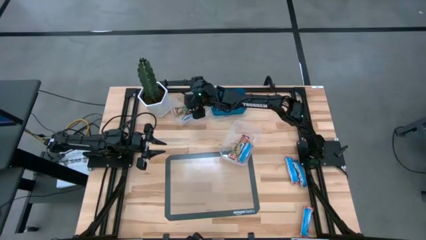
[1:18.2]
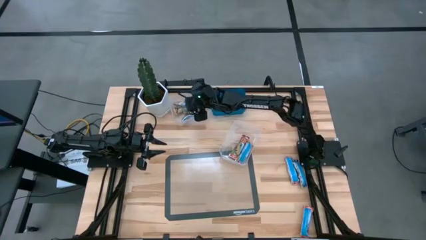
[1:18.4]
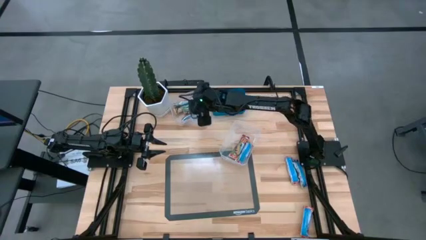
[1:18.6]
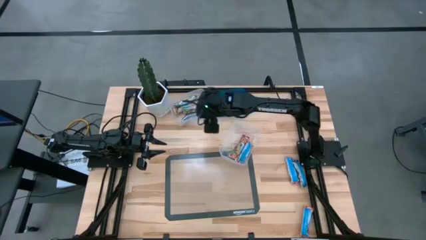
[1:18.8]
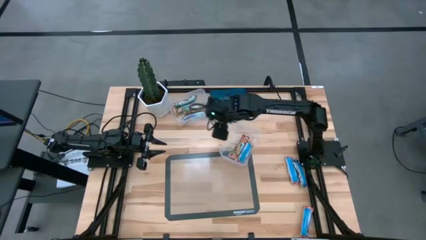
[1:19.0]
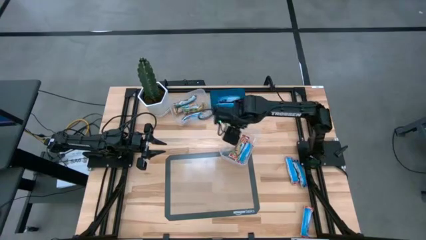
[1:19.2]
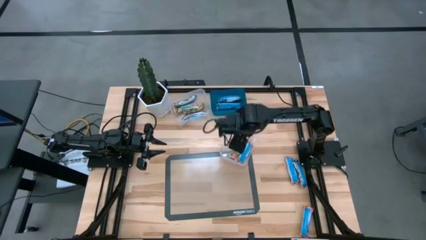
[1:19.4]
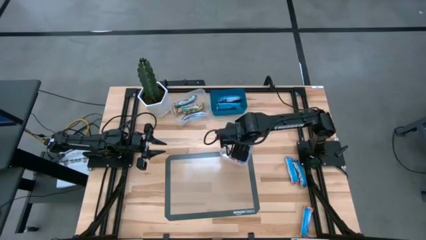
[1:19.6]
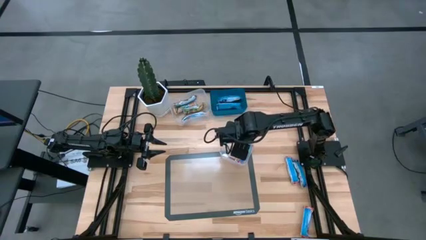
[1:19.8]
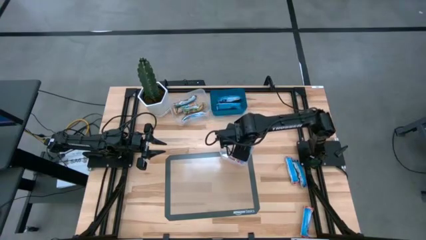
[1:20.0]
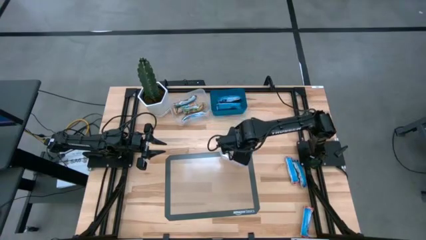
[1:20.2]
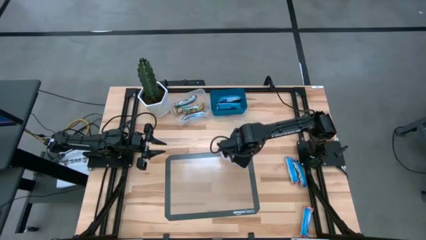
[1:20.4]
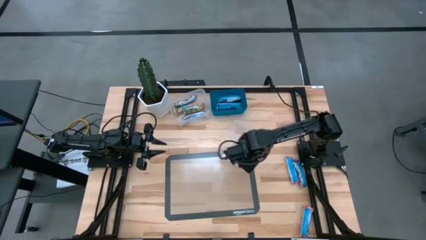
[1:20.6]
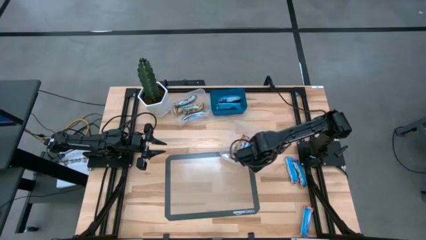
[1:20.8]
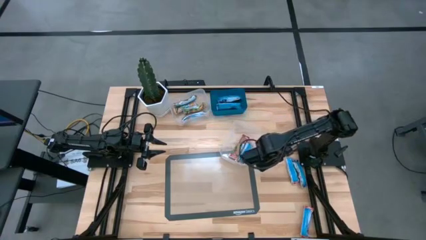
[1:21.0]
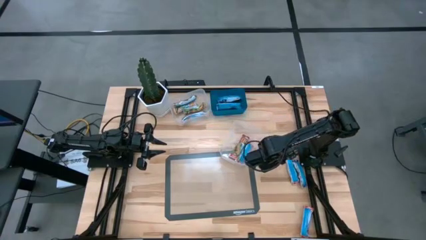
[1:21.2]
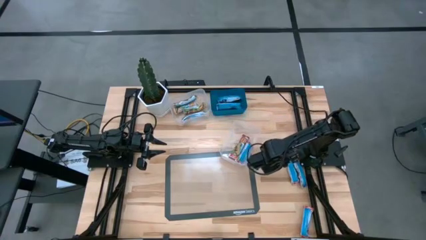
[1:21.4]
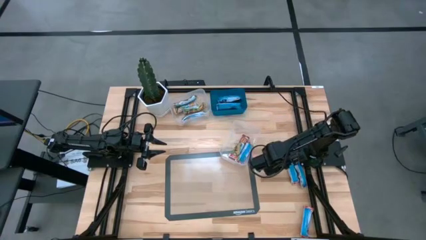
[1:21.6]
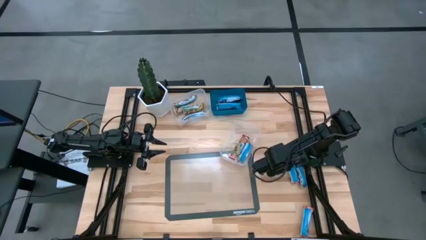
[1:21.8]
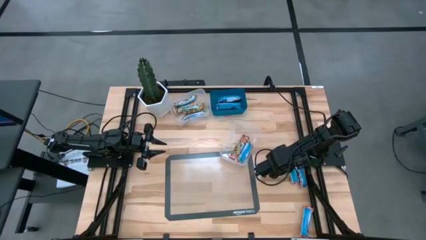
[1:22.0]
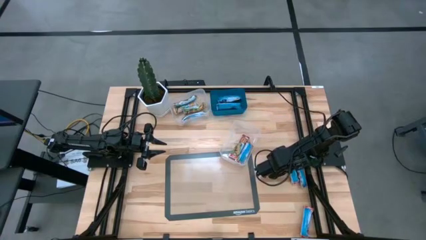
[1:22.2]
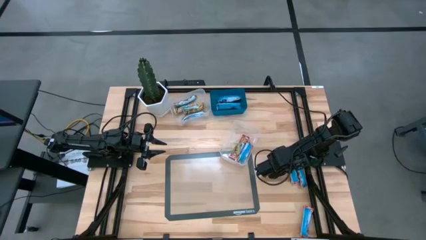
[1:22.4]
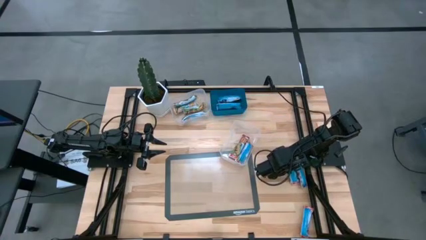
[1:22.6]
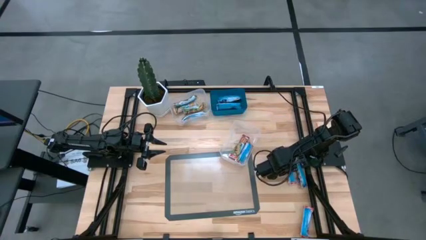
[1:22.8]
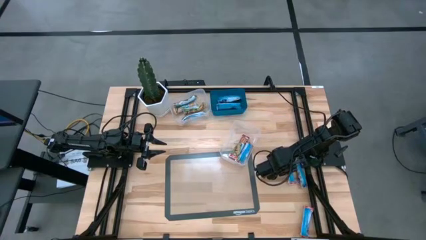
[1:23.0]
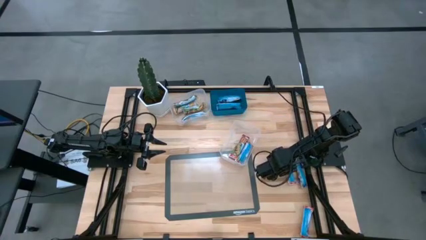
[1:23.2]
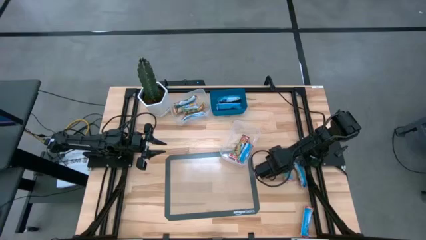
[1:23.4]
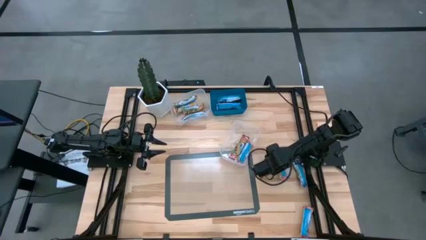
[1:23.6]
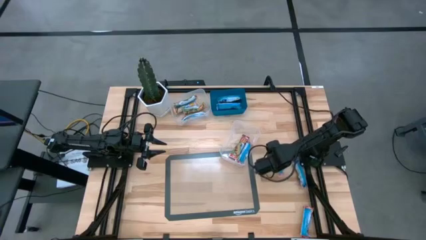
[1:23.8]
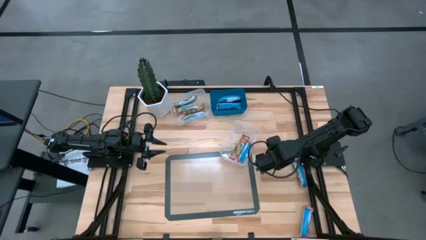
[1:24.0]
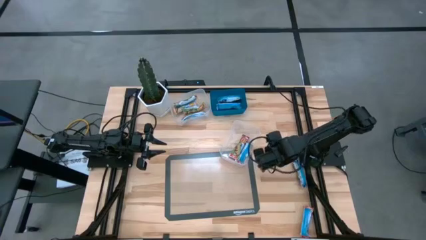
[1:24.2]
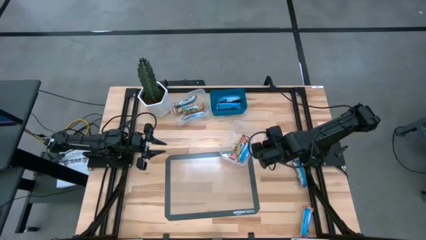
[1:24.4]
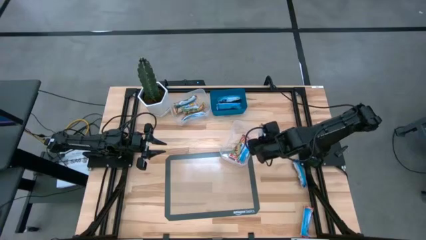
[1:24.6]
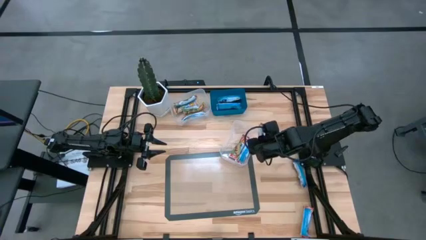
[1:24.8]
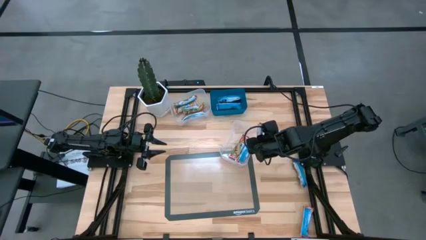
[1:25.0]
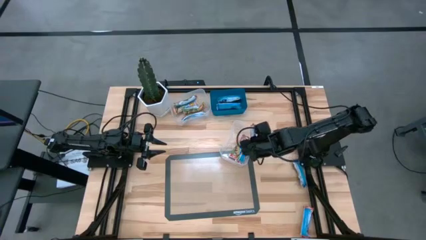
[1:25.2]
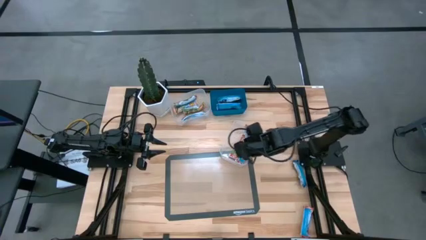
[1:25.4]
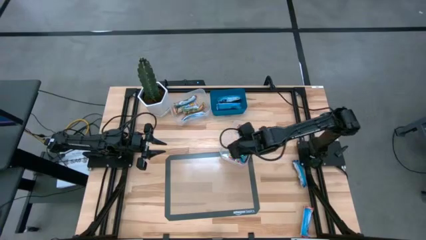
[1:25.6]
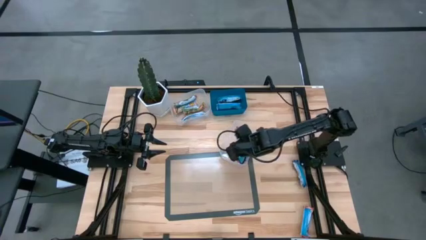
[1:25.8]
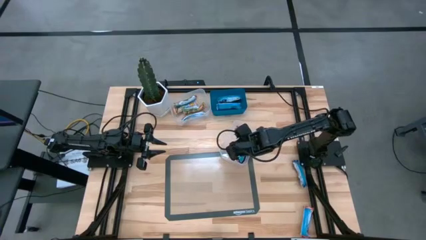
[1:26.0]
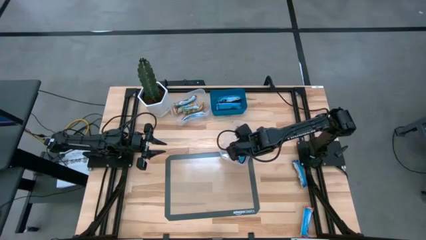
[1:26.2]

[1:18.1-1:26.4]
Task: Pick and place Granola Bars by type
Put the red granola bar into the bottom transparent bin

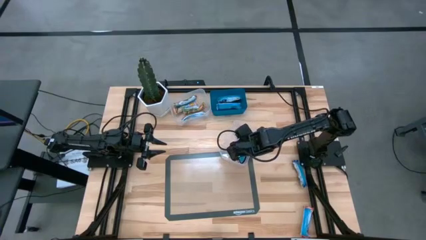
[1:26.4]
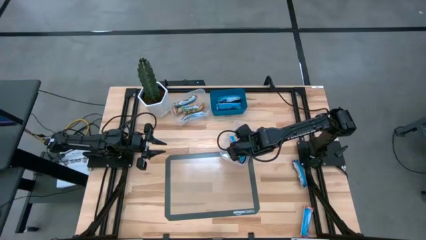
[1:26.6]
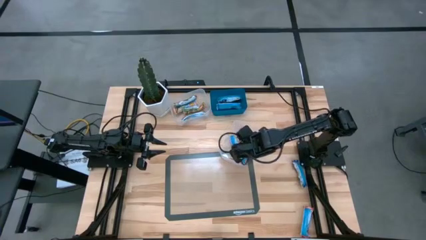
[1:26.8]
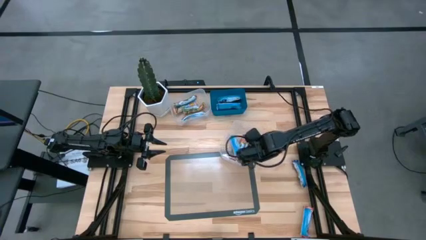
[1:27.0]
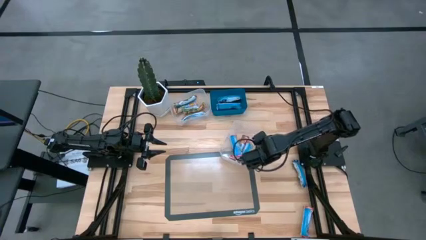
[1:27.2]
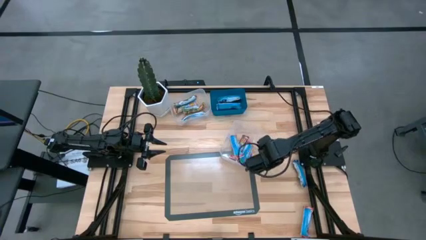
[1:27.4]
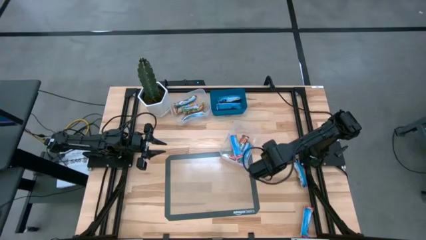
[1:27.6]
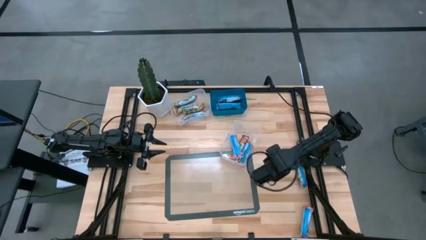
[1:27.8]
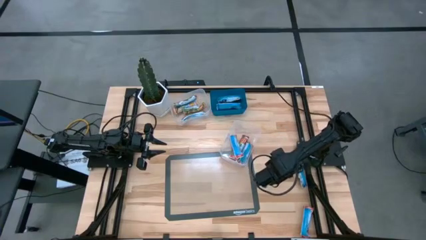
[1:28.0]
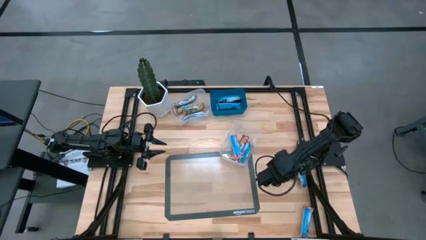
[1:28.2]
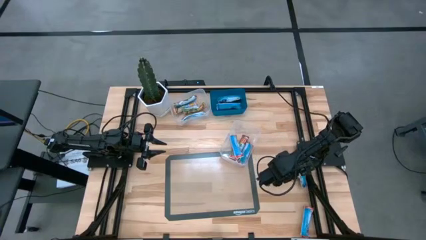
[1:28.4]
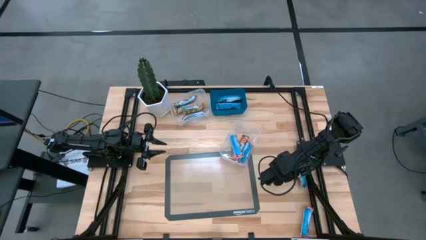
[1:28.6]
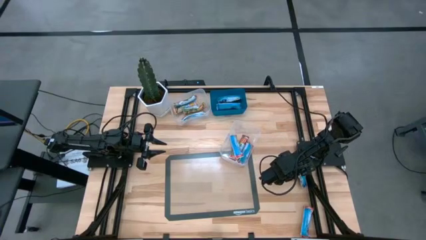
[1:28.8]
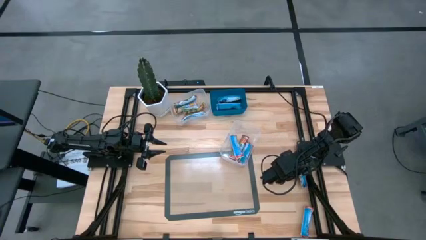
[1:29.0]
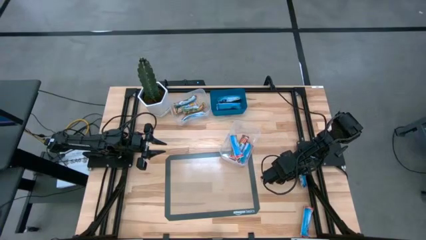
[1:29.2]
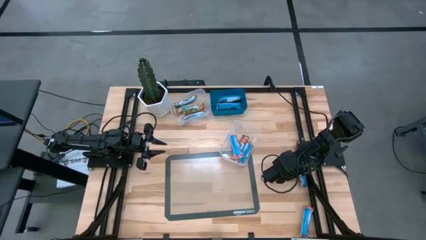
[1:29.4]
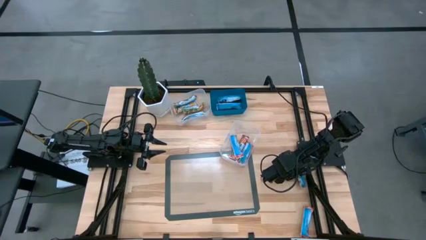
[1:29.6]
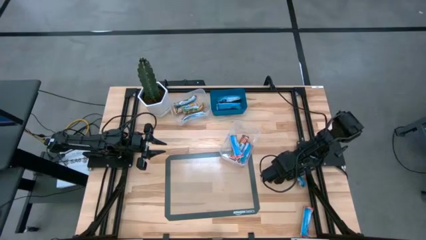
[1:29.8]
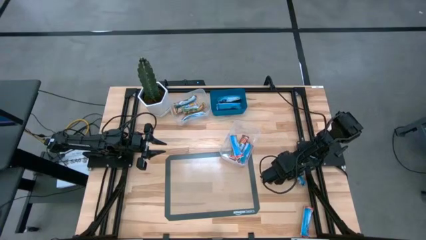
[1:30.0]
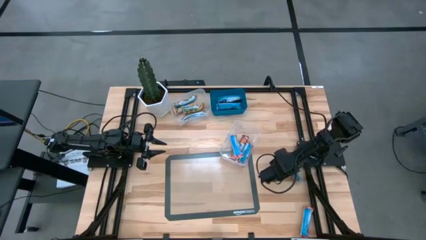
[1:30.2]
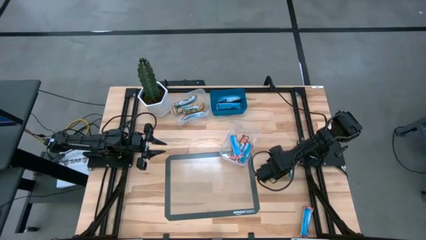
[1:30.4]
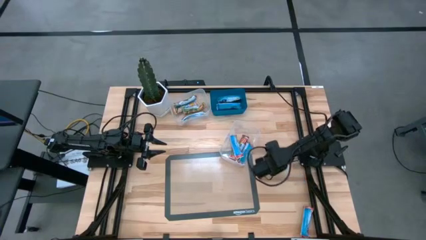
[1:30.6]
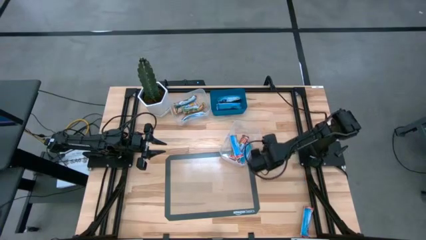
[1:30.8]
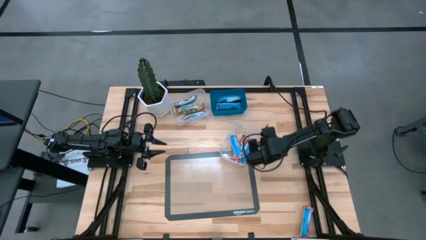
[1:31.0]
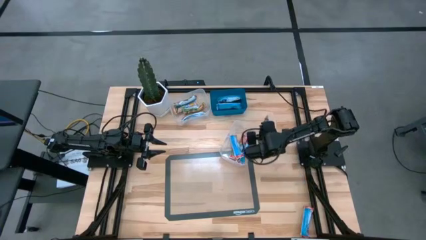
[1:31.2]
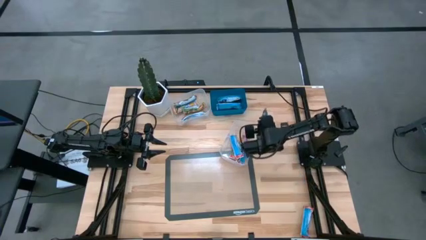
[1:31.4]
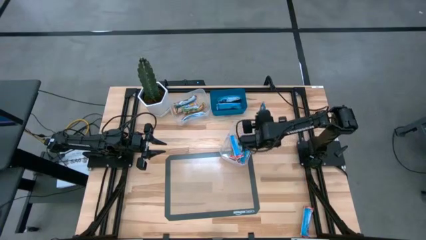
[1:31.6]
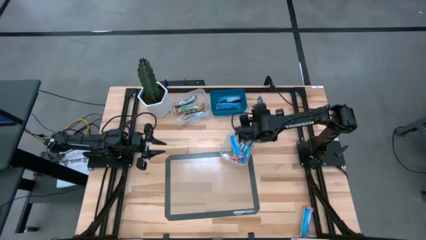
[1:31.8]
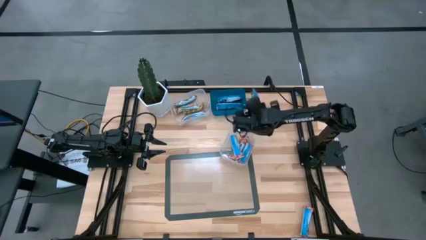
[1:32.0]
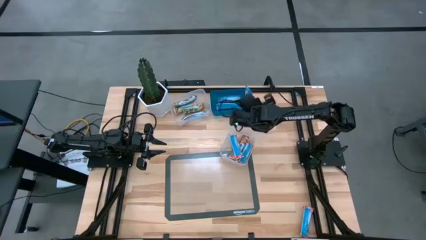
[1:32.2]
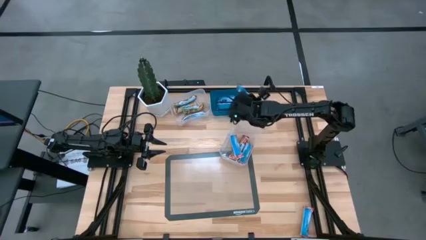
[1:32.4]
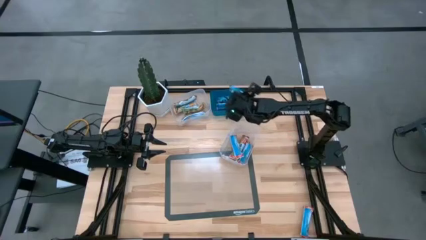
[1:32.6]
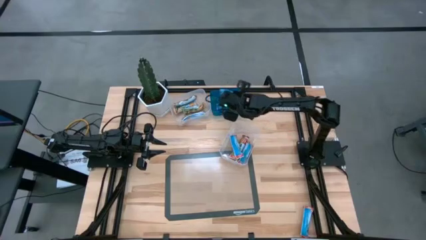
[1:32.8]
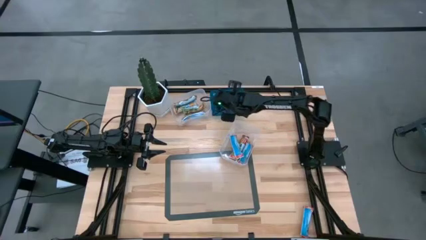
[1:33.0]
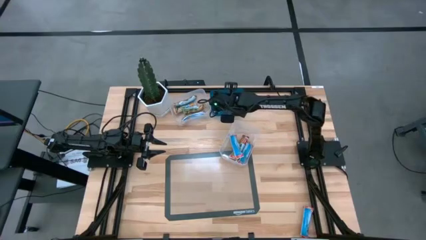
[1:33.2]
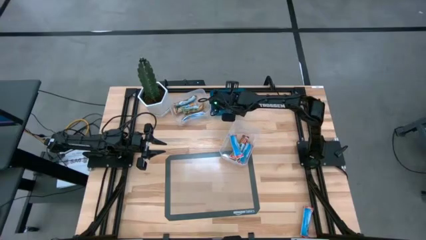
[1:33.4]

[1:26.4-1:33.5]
Put the blue granola bar into the blue bin
